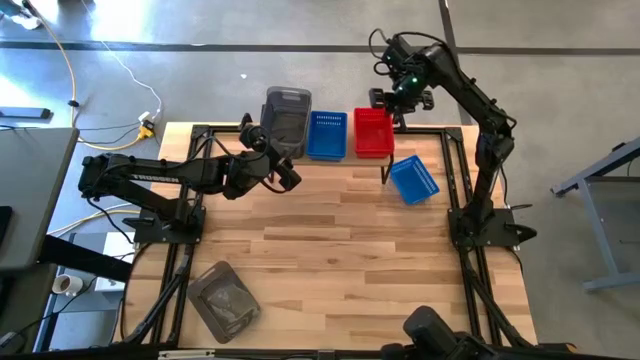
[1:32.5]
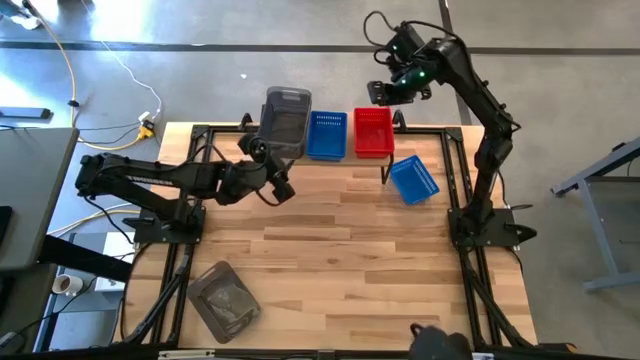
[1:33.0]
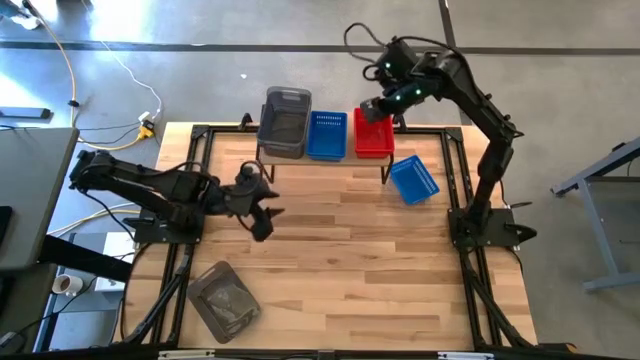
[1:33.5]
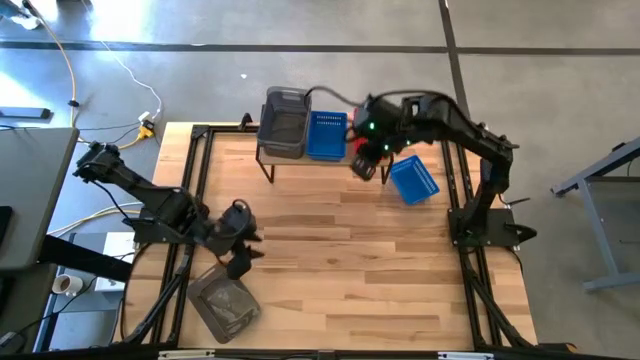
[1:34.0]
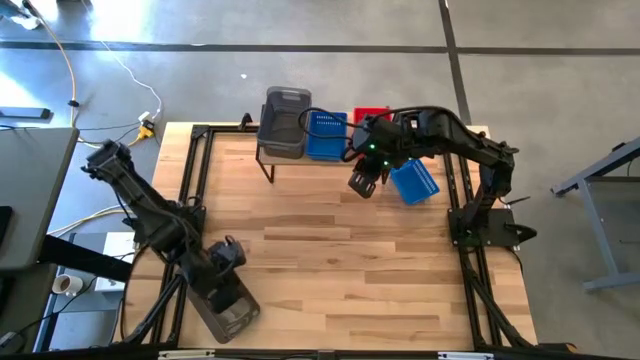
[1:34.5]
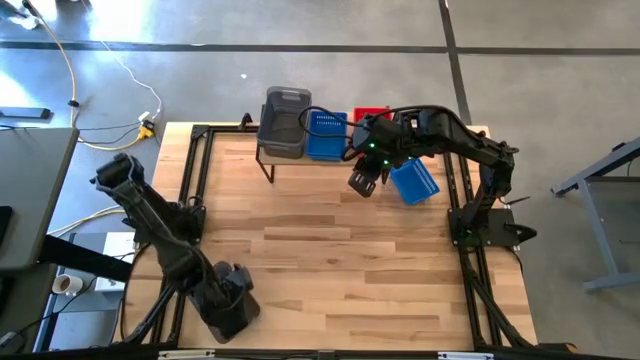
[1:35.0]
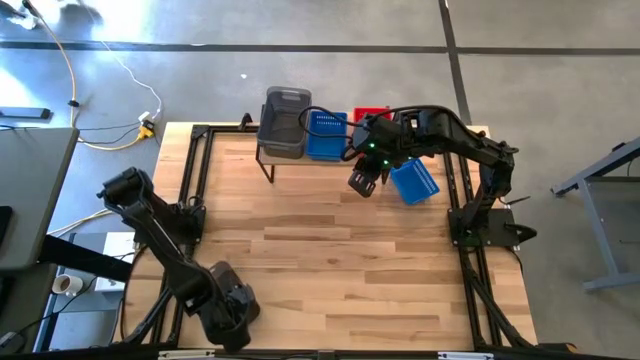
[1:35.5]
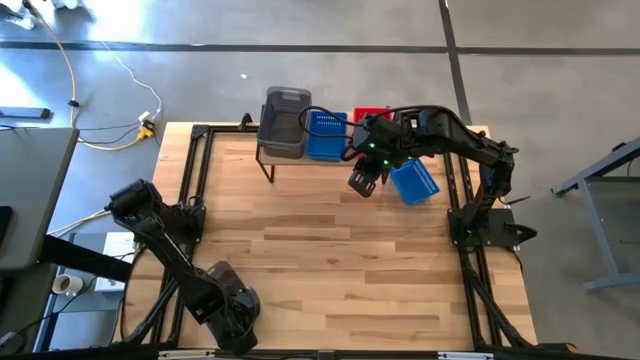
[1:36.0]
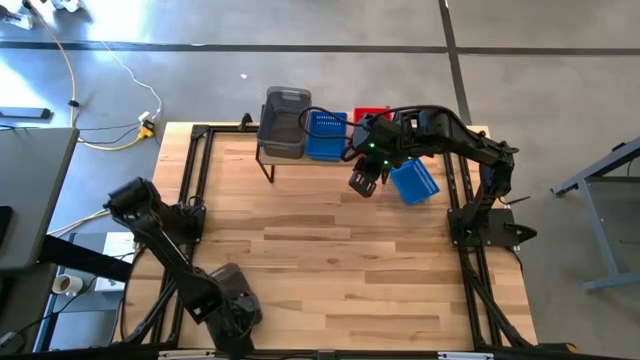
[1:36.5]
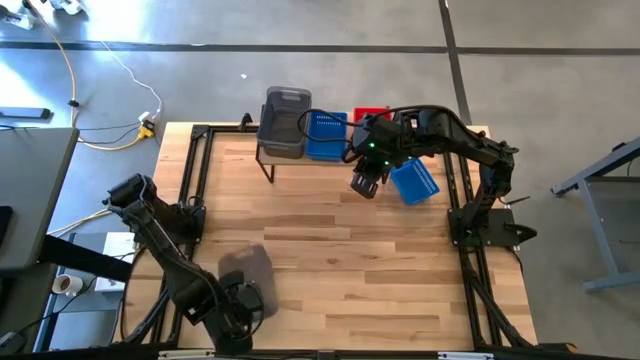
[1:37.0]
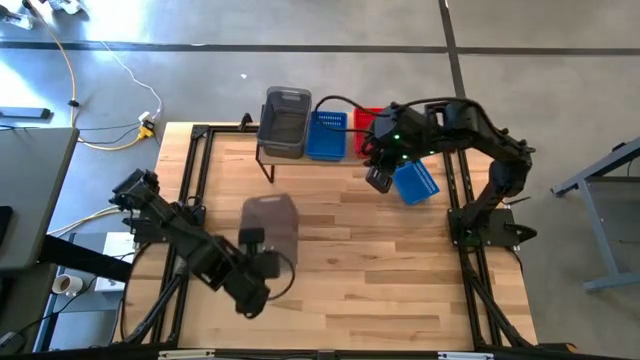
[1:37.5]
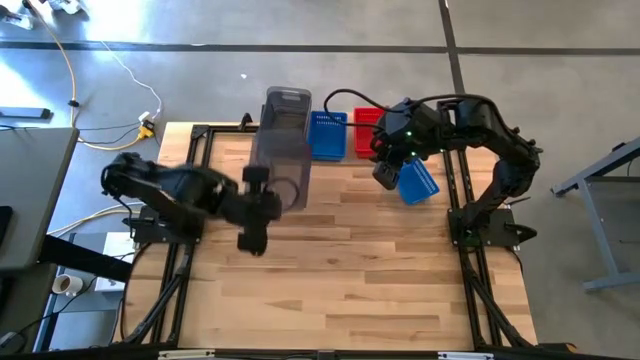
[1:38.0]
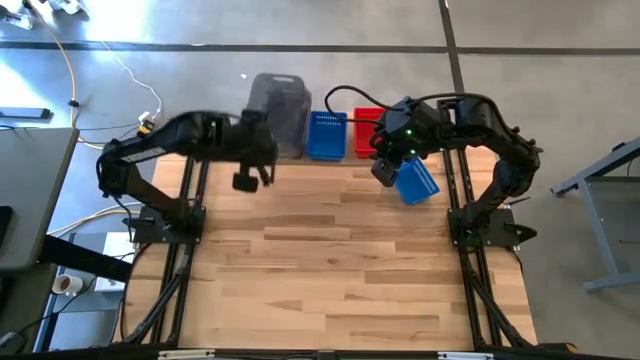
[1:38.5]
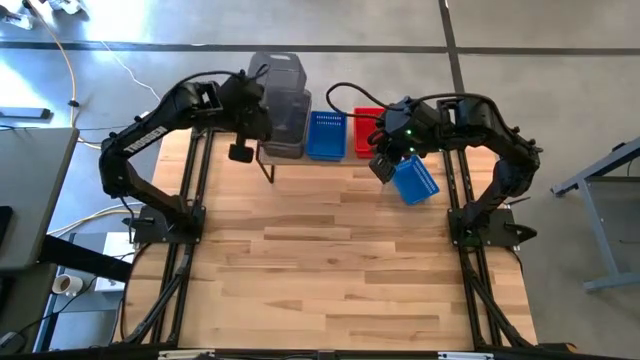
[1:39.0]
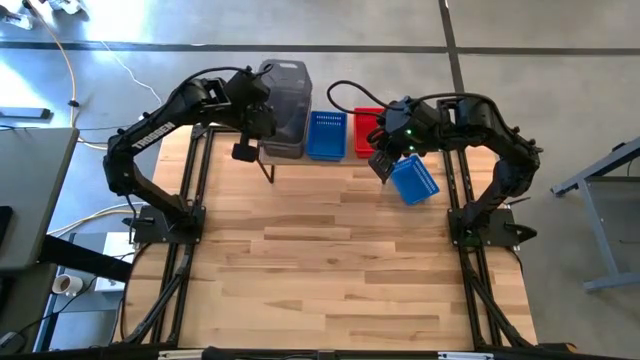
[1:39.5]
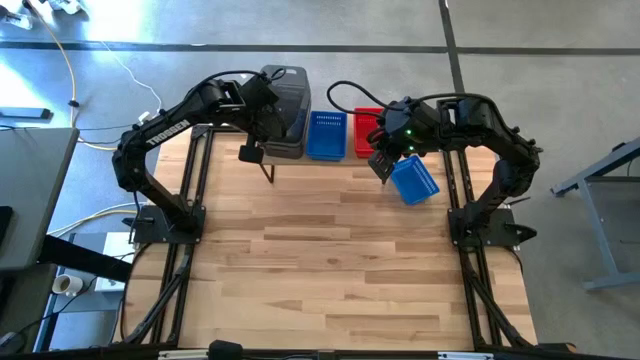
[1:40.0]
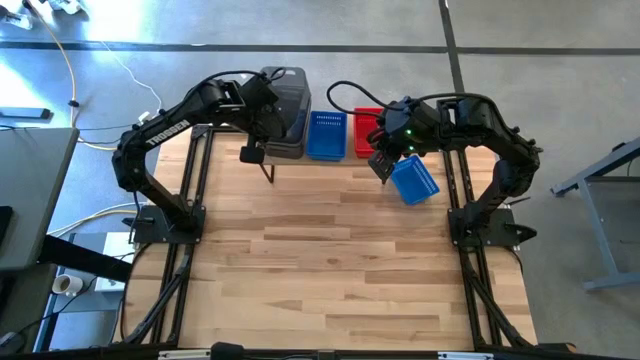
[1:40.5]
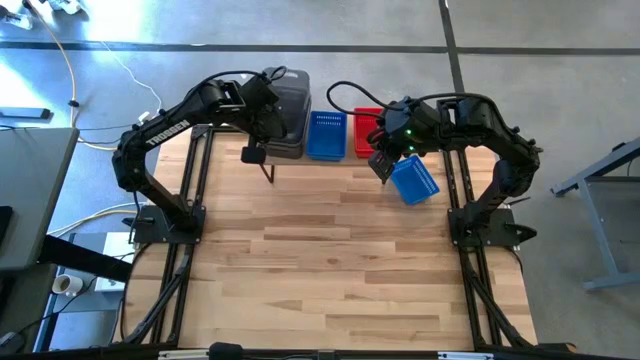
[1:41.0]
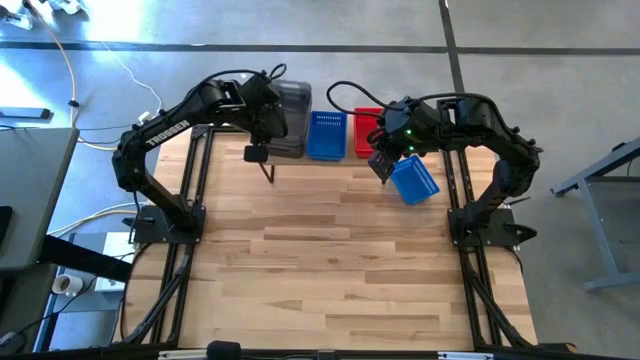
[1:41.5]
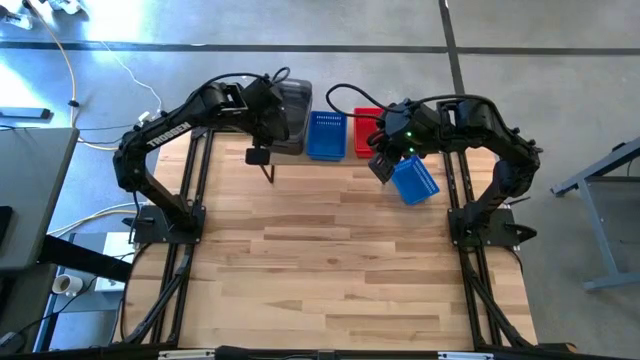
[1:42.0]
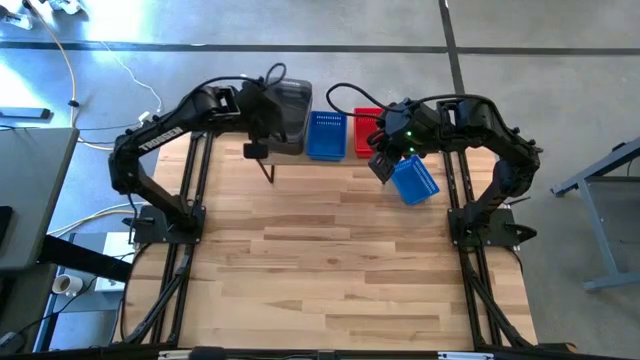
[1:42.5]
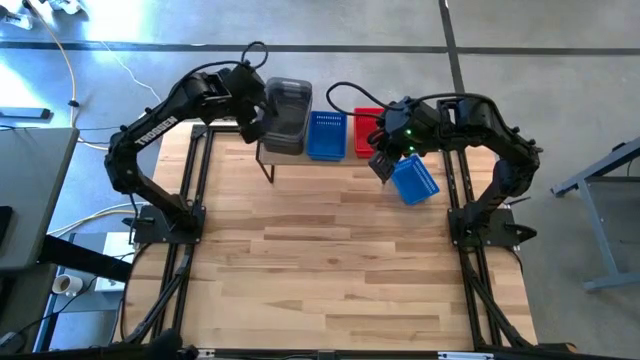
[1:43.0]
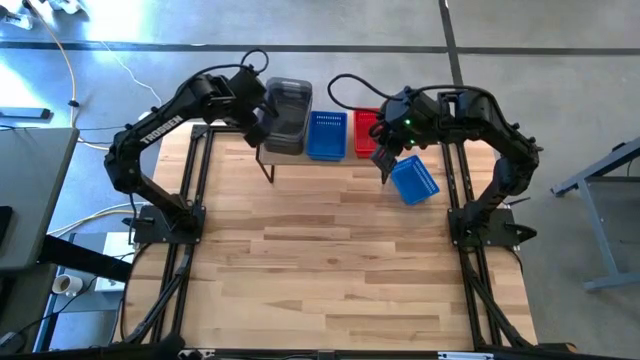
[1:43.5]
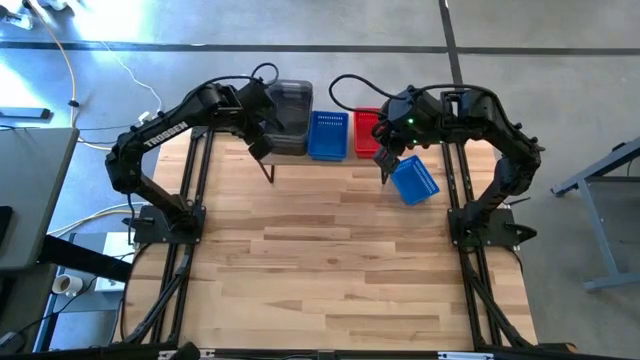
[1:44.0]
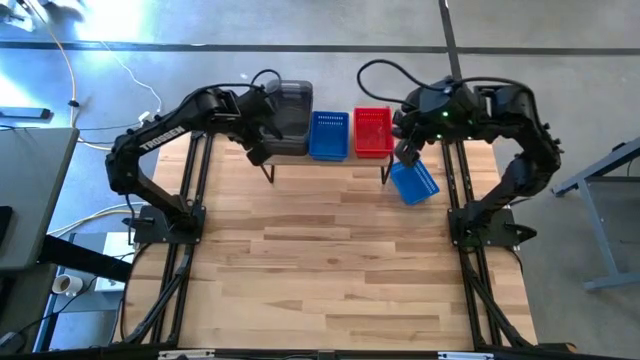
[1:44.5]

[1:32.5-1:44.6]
Task: Stack baskets on shelf by color
Stack the black bin on top of the black bin on the shelf

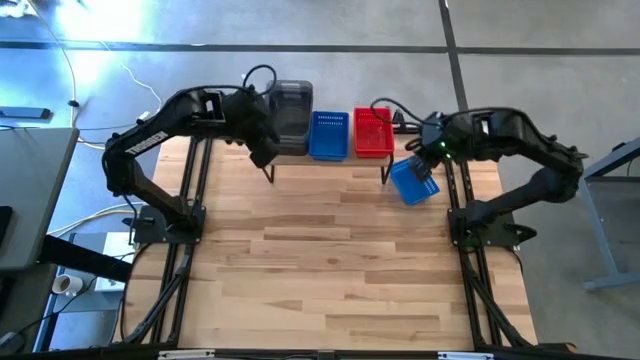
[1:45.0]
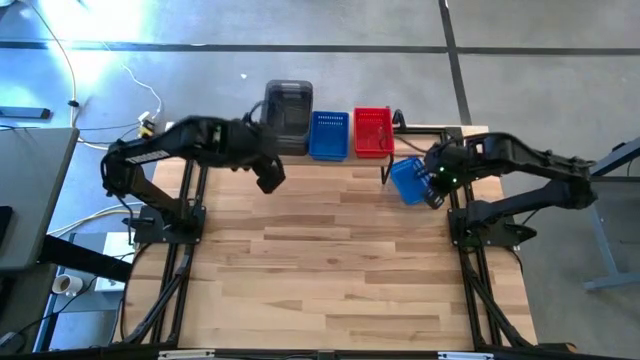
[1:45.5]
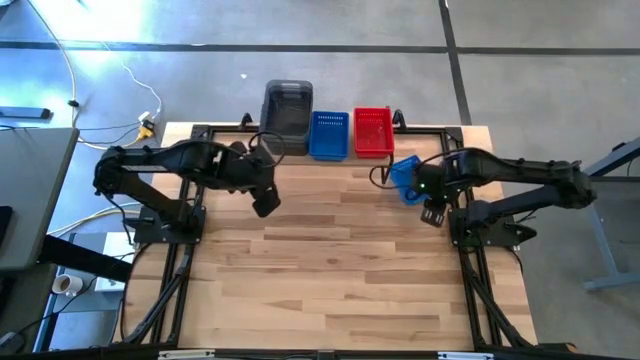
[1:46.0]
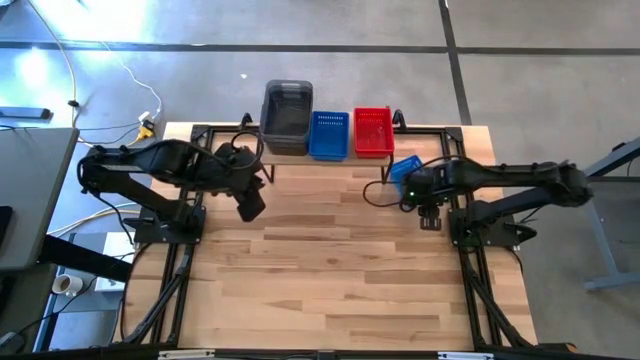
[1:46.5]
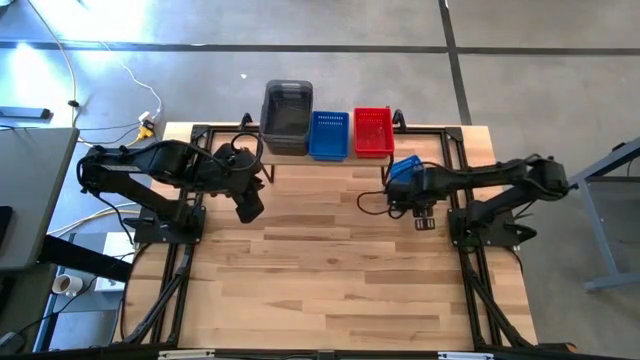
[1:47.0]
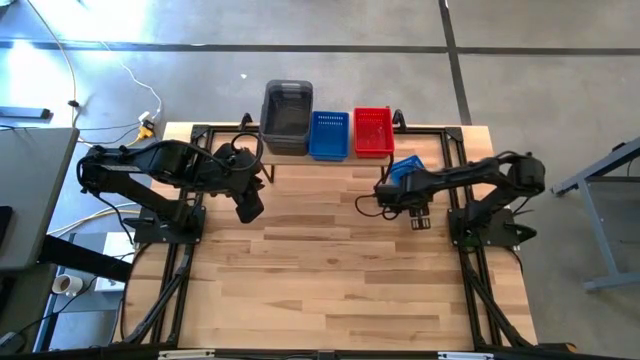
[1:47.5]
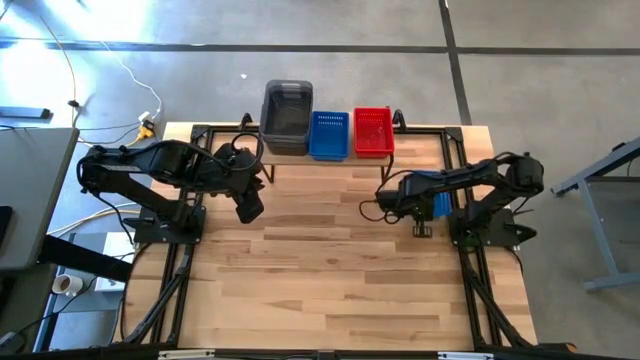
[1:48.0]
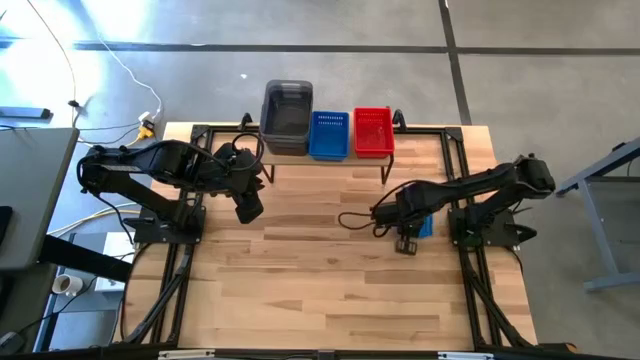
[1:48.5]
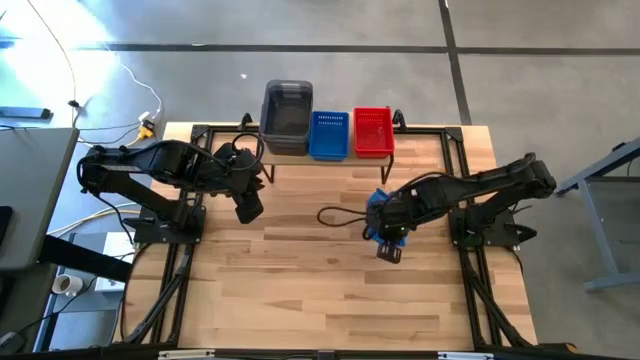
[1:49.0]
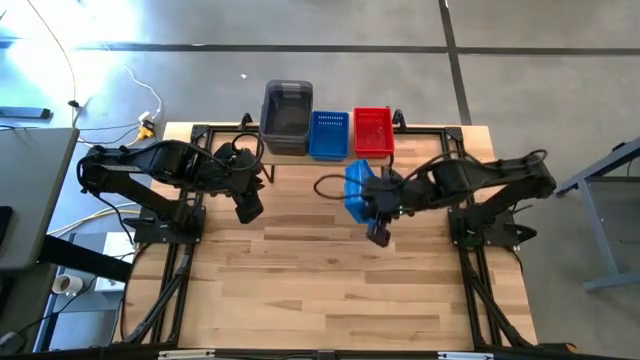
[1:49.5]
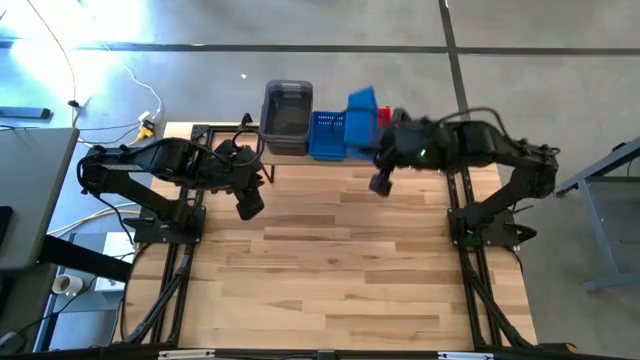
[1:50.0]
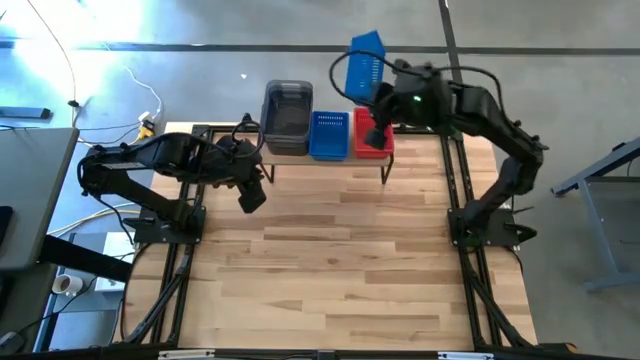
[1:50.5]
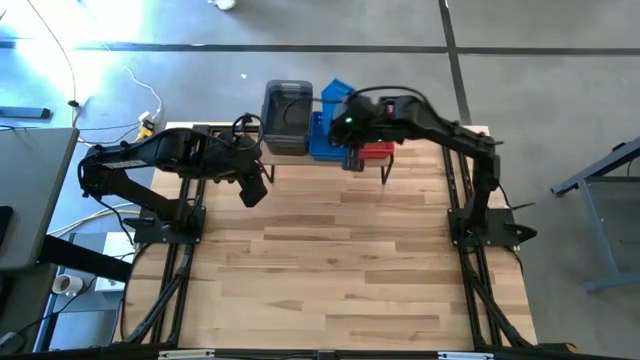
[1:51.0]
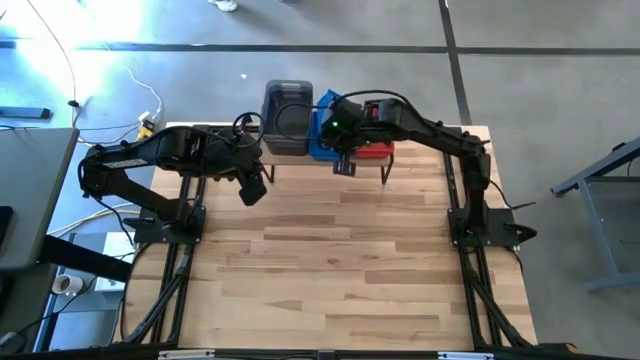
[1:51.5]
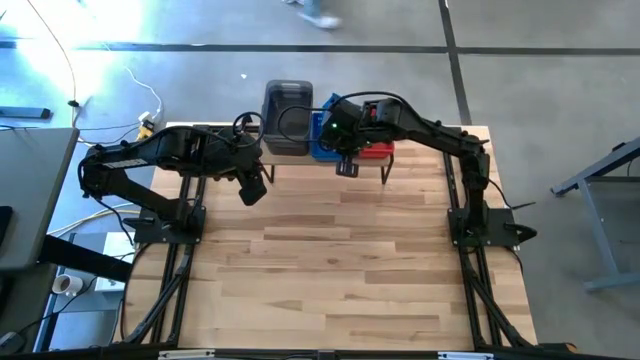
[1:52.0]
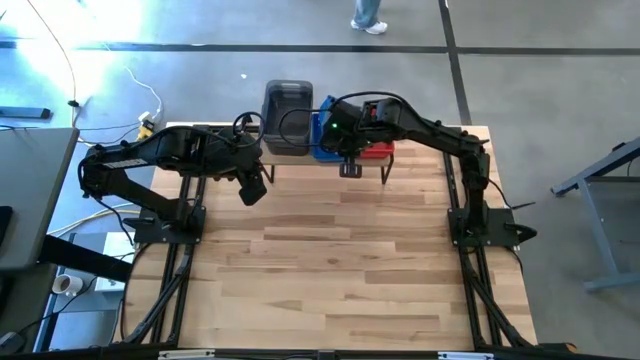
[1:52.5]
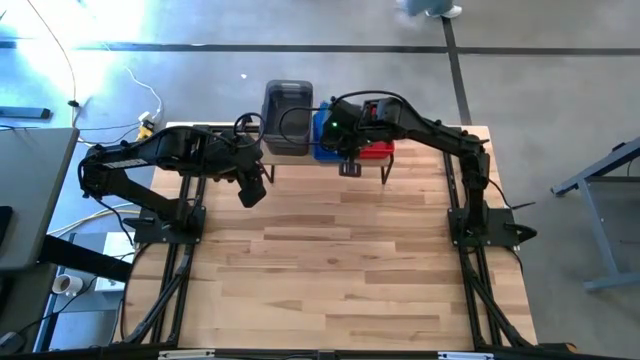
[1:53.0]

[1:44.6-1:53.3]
Stack the blue bin on top of the blue bin on the shelf

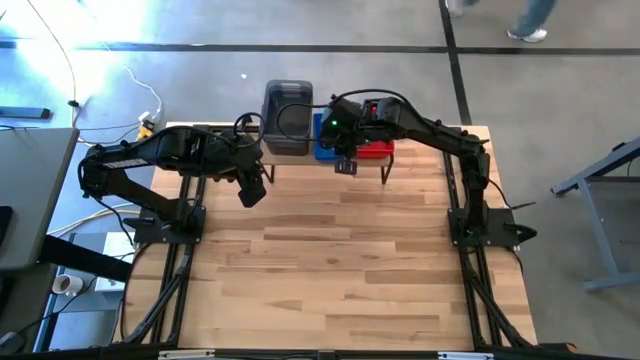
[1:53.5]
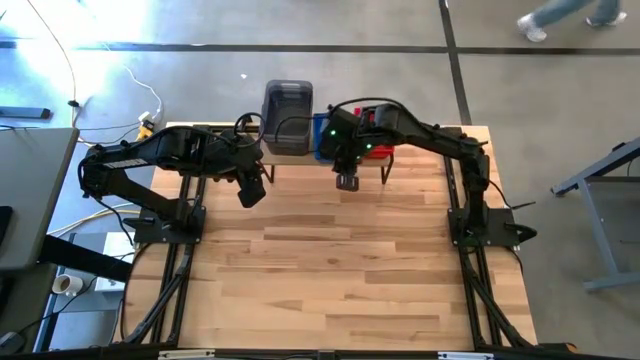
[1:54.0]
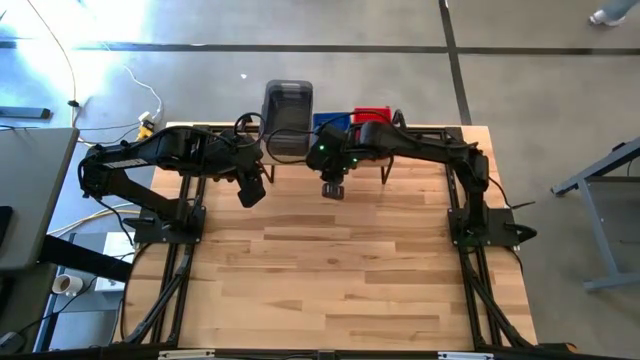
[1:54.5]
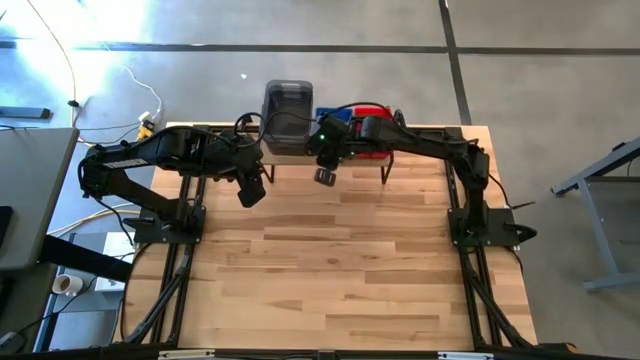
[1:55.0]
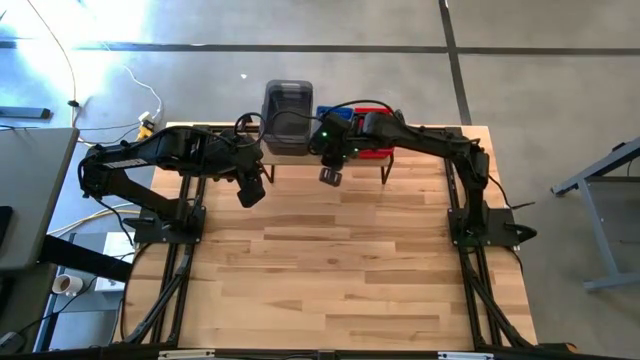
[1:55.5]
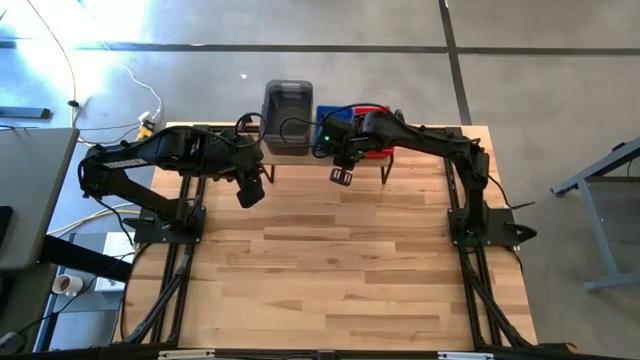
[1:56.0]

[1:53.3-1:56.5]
Adjust the stacked blue bin
